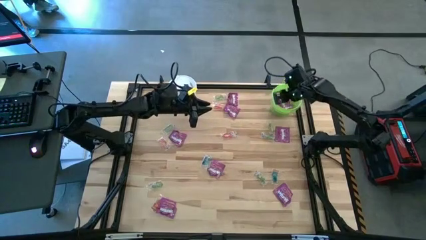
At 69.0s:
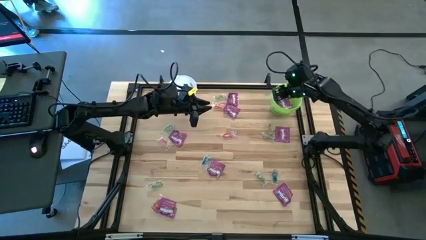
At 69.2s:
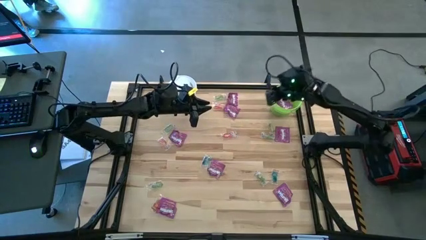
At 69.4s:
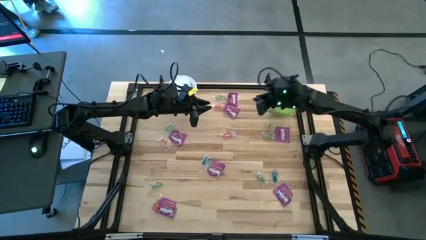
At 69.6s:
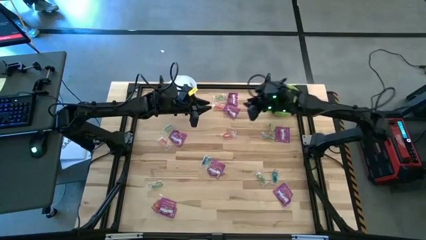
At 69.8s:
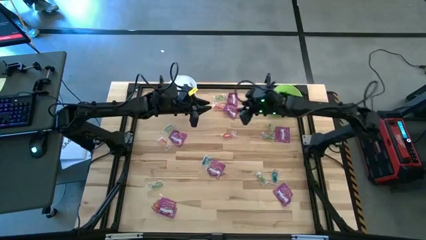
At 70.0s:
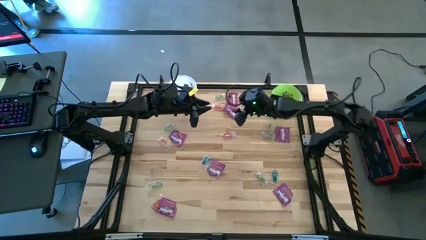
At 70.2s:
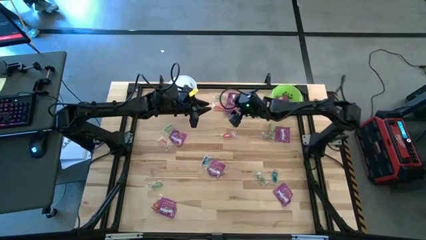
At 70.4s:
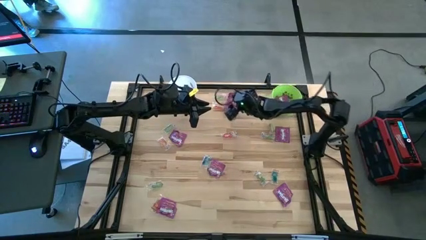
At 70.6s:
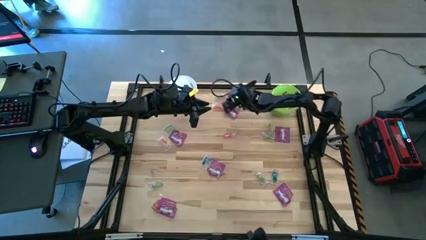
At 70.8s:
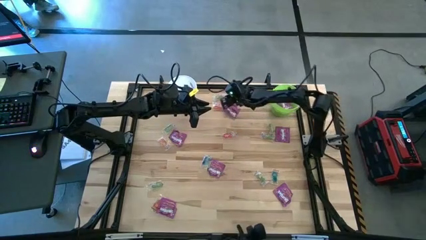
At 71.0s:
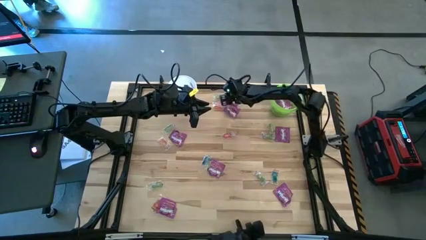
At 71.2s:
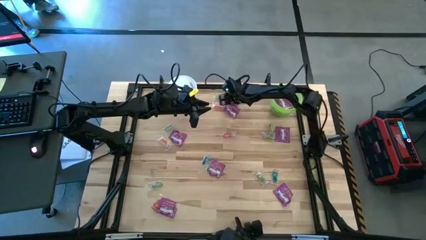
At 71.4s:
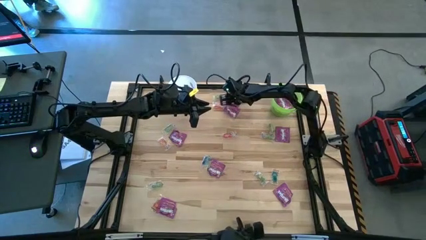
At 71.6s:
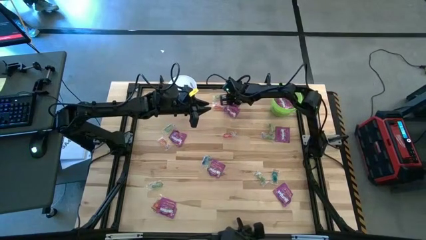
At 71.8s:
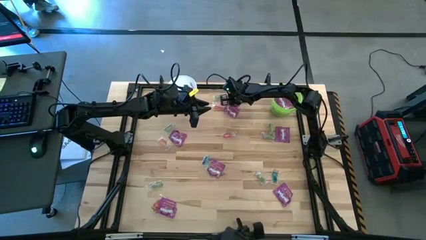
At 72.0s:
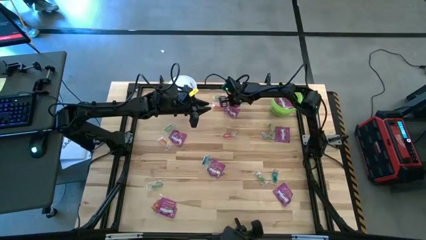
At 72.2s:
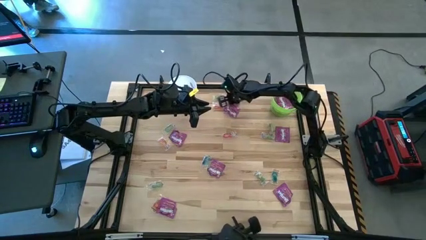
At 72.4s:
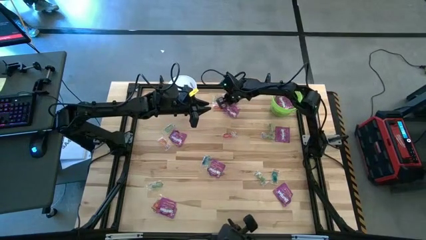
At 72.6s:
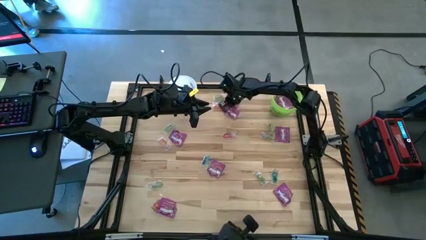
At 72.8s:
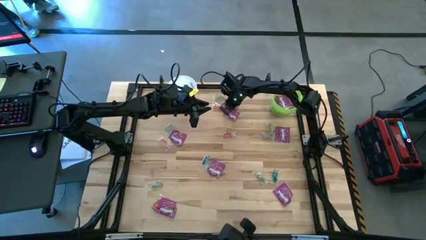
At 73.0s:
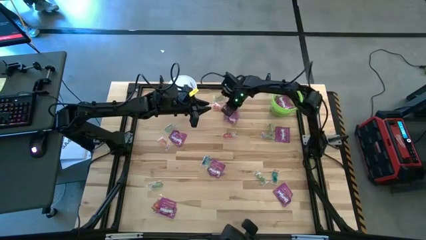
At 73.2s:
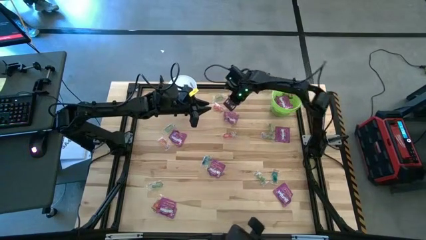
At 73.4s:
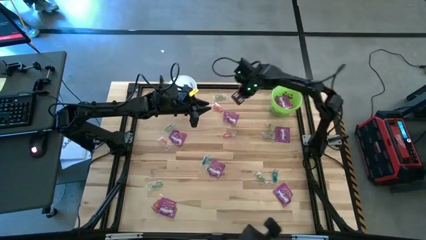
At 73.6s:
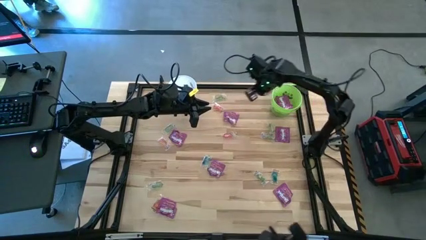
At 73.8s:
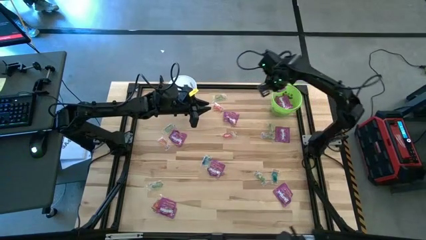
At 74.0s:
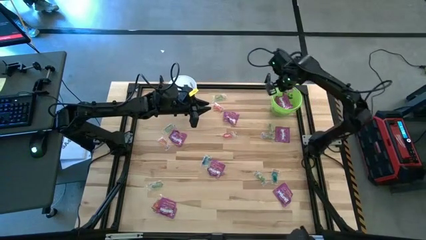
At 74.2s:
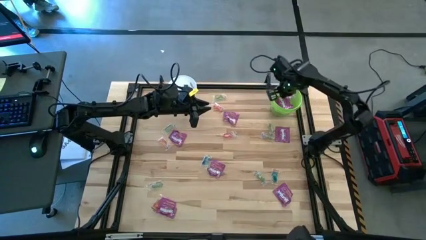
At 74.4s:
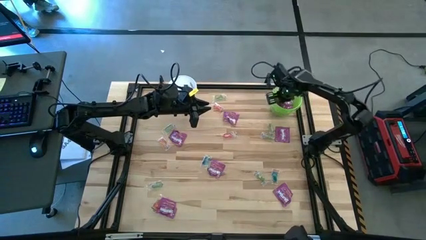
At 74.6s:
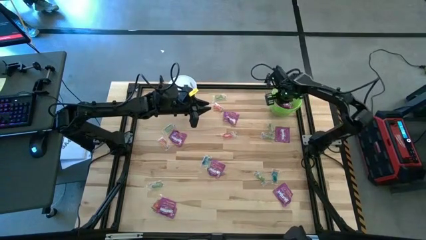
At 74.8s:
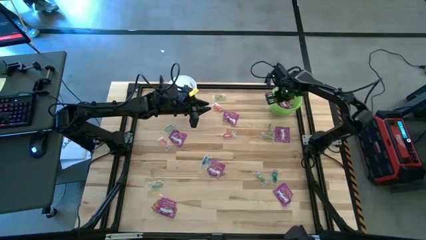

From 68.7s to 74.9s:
Task: Sort candy by brand, put in halloween buckets
Put the violet candy into the green bucket

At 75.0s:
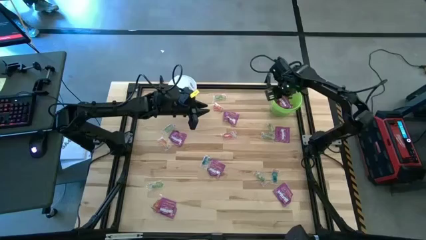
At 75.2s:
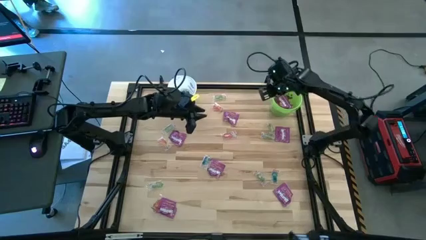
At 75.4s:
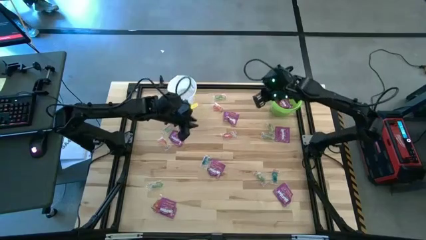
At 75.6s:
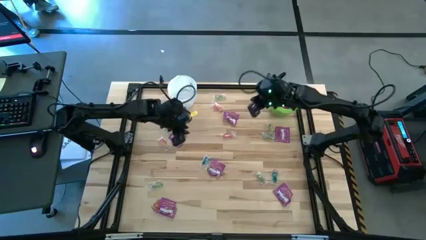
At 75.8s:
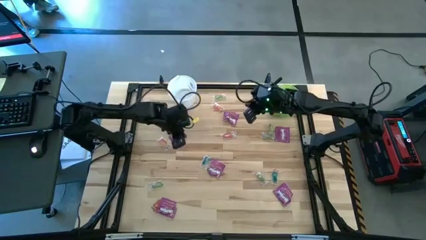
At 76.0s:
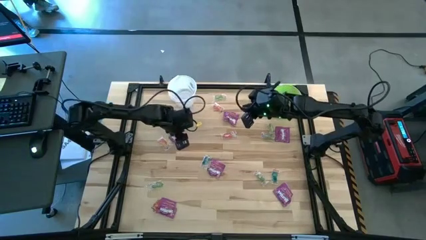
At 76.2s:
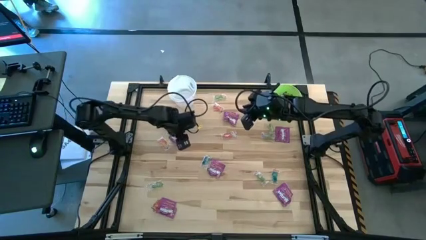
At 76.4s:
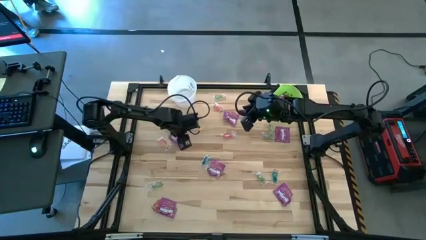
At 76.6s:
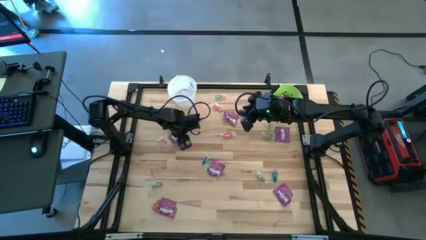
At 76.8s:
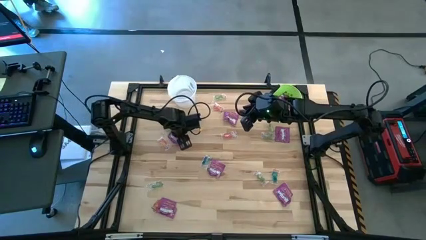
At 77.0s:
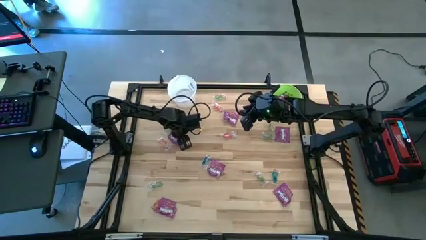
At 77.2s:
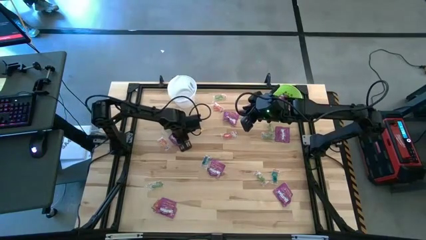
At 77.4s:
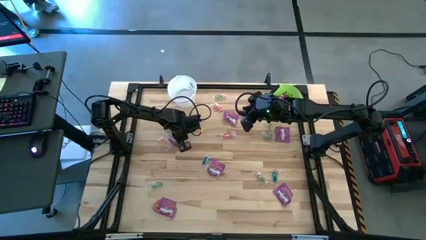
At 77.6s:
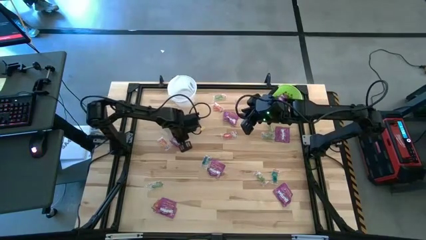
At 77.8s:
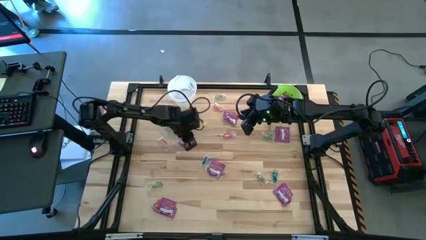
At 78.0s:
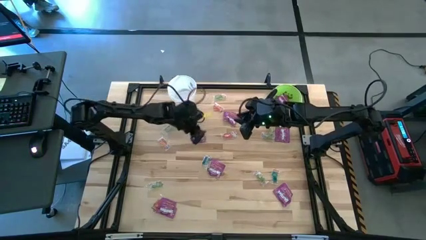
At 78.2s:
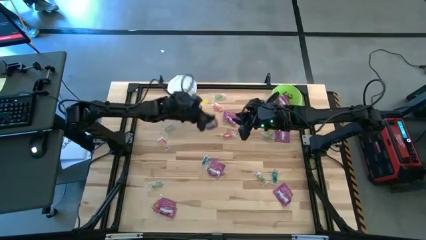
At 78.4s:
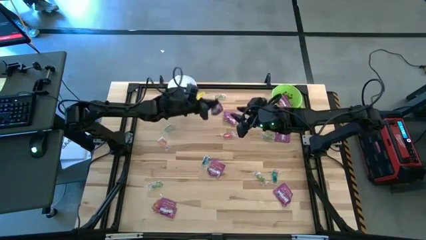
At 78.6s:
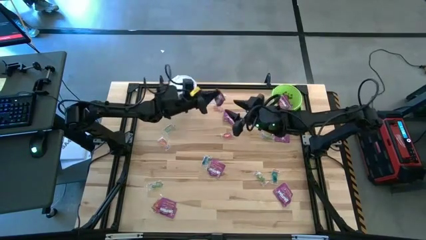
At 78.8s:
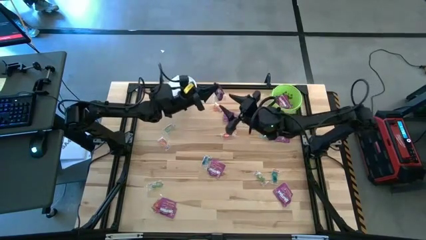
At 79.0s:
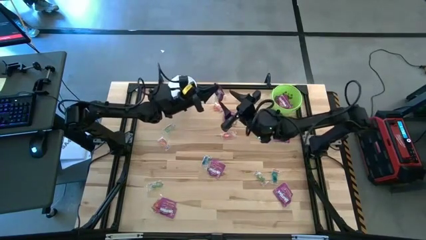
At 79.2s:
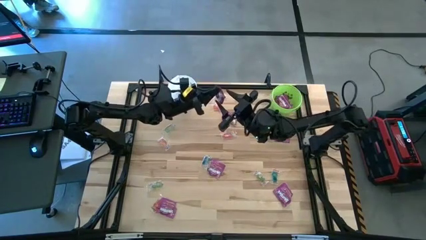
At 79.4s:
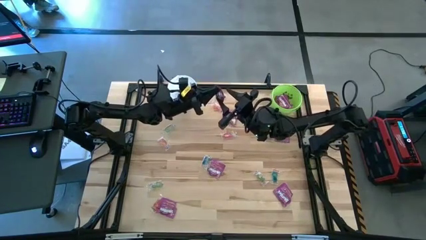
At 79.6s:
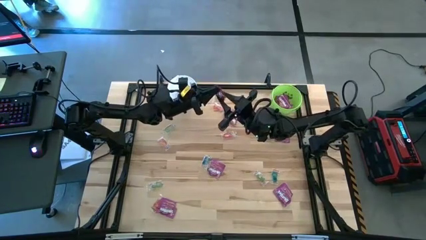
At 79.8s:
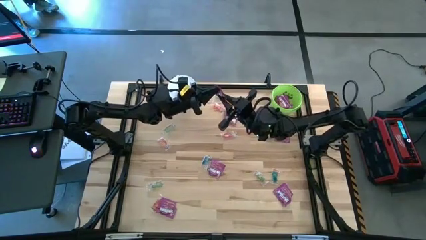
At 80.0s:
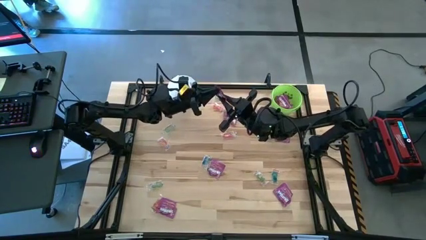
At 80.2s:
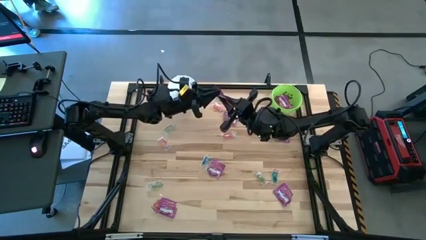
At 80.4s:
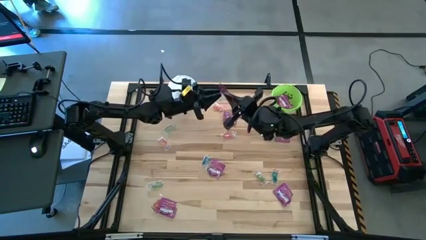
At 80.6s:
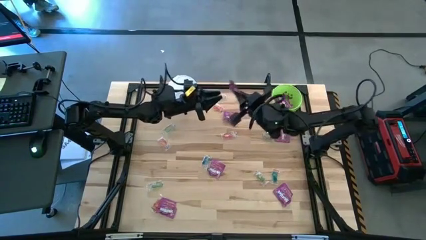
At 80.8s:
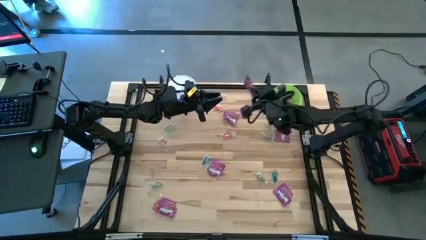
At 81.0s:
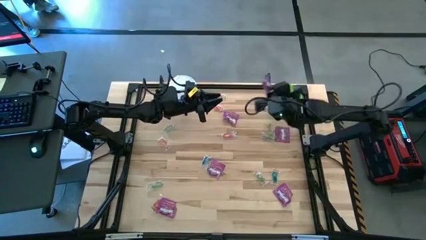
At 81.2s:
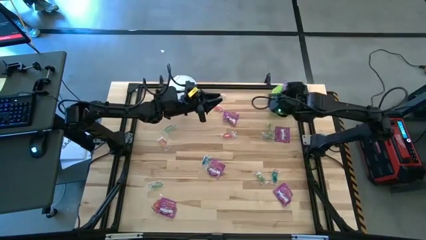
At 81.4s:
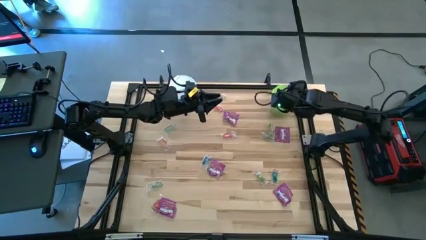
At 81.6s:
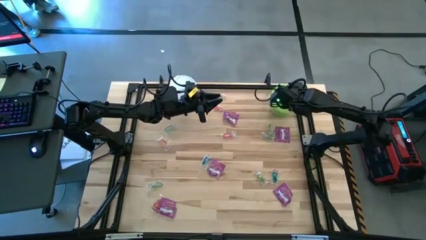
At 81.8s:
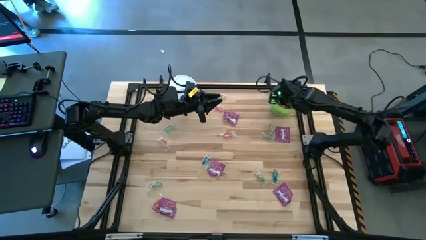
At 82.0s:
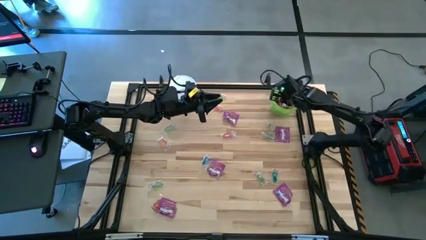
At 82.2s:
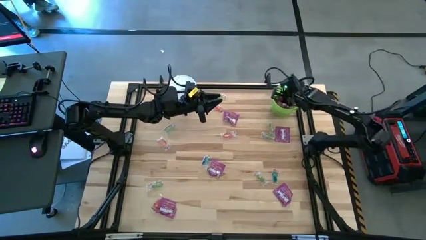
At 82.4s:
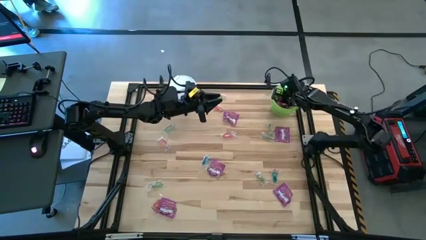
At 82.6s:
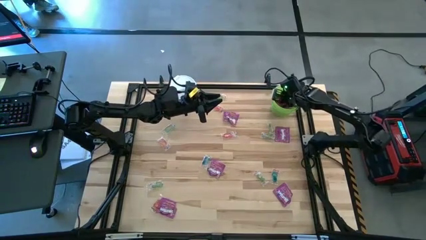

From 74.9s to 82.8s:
Put the violet candy into the green bucket

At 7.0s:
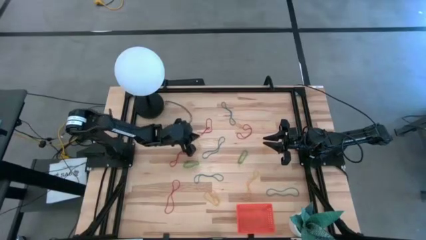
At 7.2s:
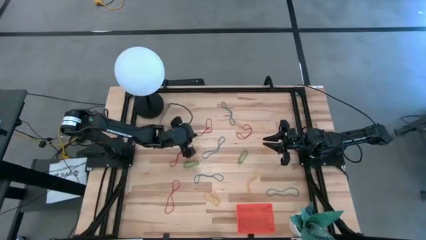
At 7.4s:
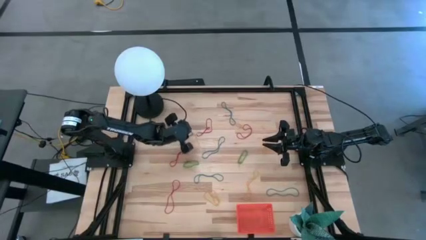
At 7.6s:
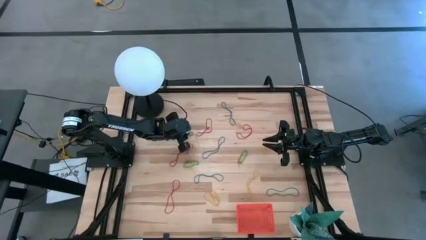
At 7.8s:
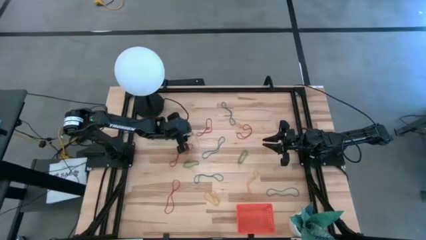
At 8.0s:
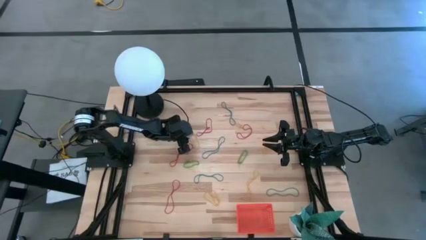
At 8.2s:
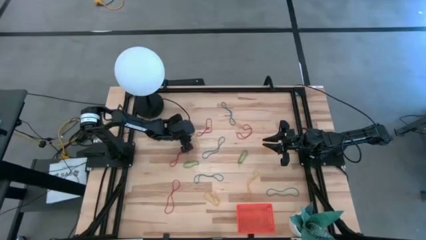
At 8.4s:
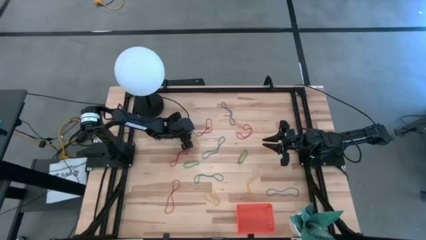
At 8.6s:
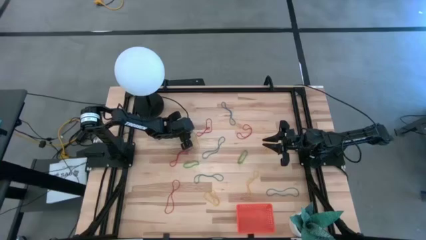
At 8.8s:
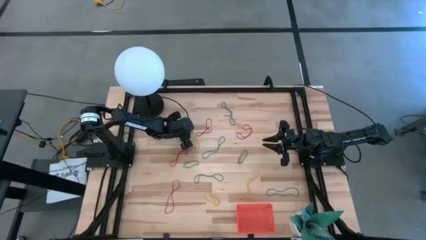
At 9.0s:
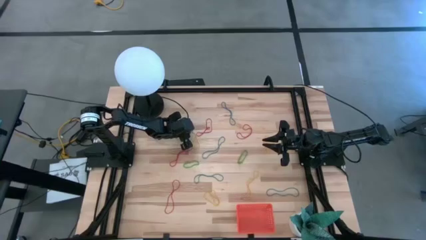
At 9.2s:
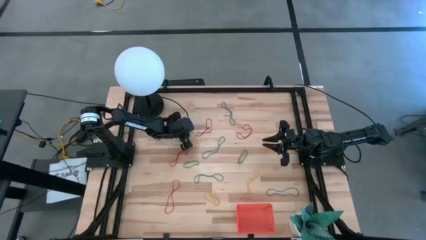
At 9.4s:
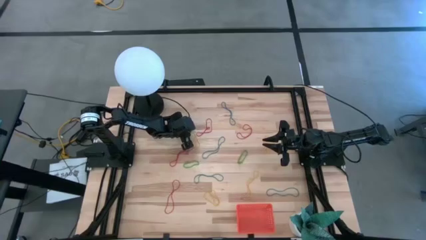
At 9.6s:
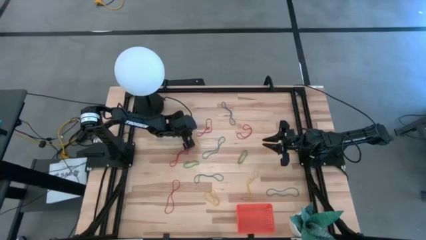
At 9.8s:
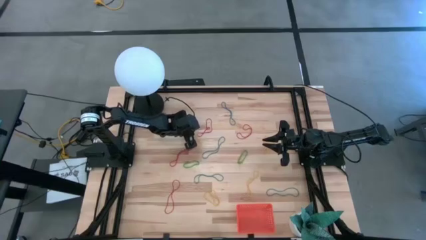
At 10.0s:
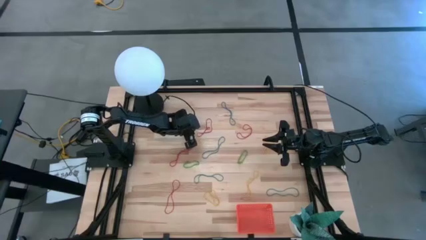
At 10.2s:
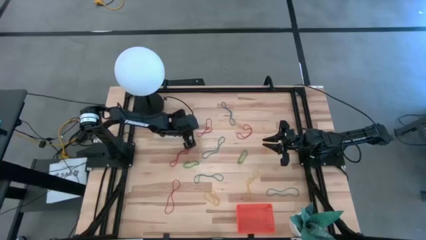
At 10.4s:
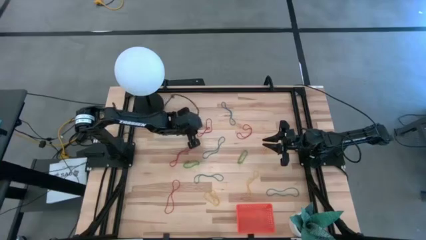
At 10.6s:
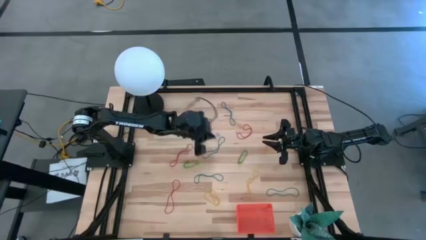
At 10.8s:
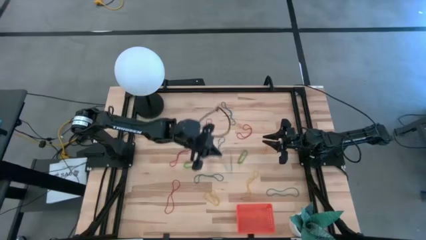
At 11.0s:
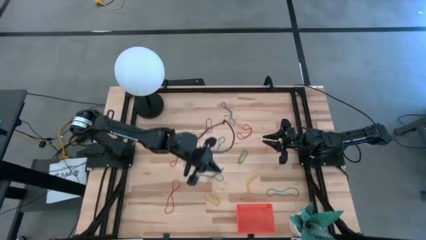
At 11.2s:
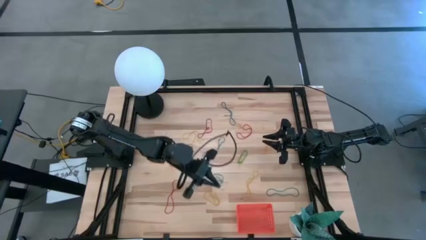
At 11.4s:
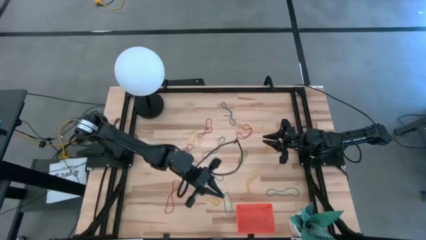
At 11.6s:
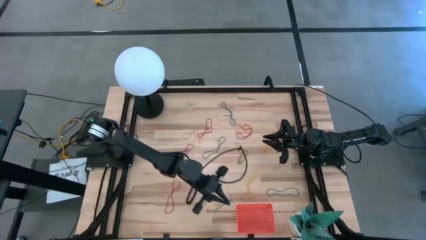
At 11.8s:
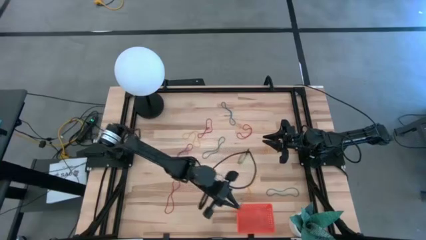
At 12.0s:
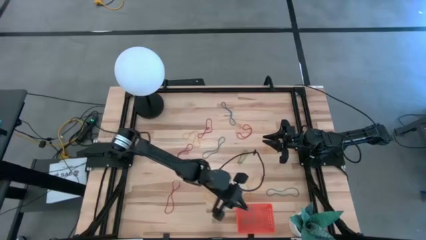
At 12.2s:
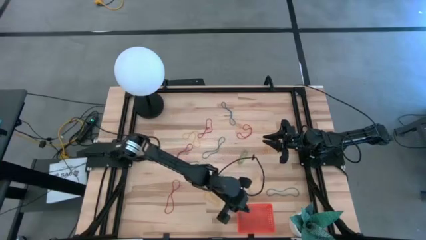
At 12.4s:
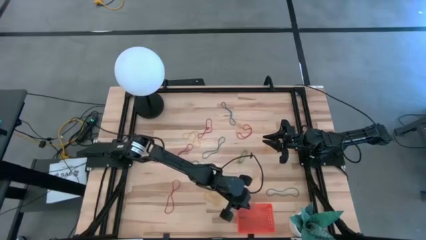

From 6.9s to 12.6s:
Task: Pick and place items into bin
Put the blue rubber band into the orange bin
